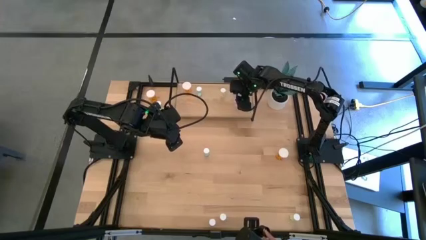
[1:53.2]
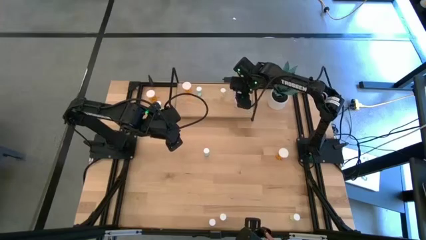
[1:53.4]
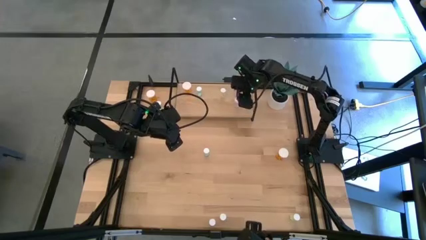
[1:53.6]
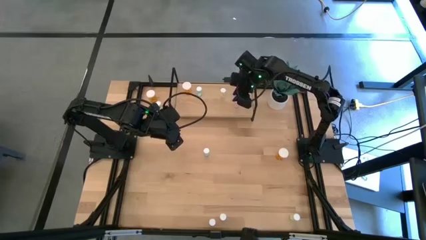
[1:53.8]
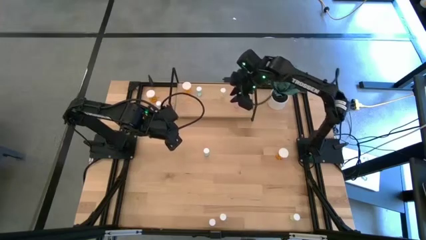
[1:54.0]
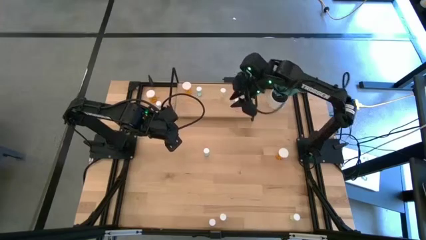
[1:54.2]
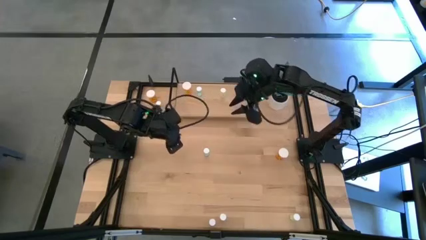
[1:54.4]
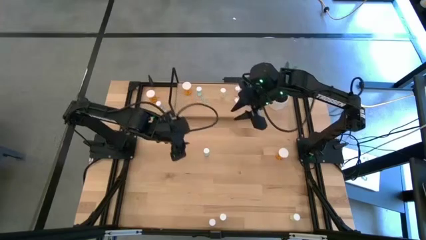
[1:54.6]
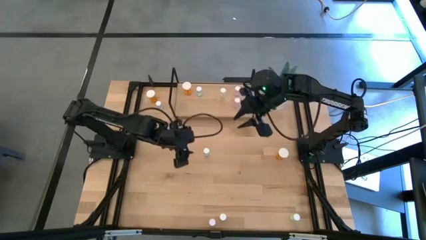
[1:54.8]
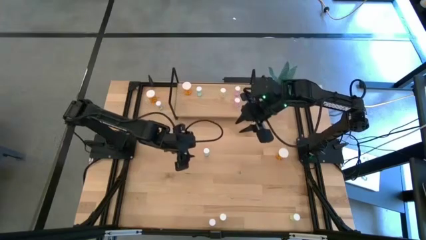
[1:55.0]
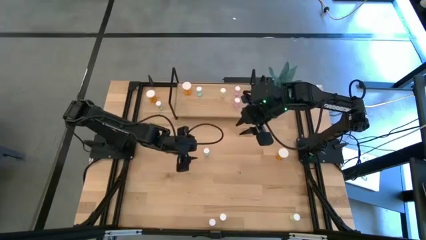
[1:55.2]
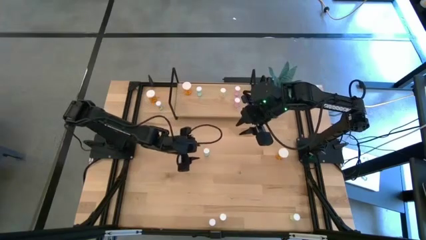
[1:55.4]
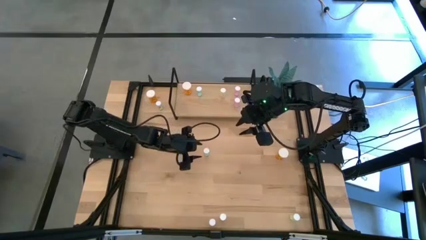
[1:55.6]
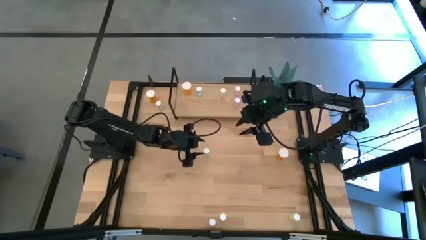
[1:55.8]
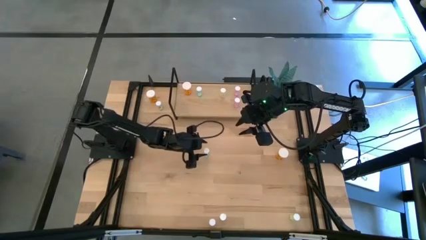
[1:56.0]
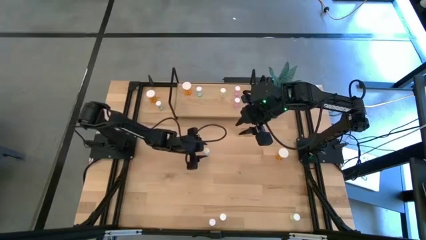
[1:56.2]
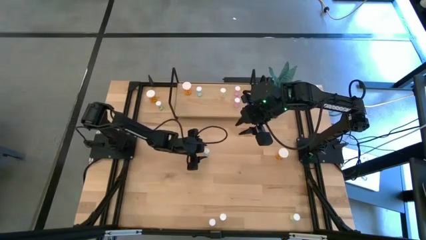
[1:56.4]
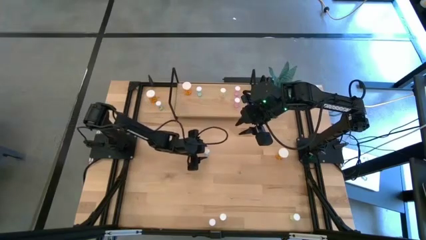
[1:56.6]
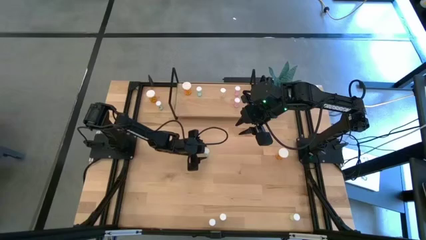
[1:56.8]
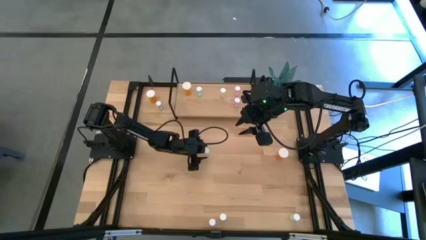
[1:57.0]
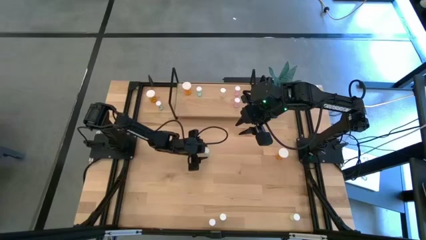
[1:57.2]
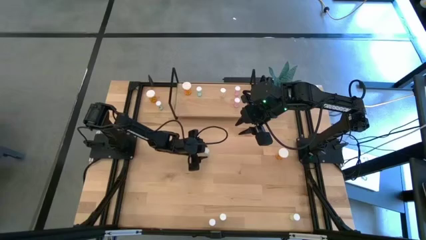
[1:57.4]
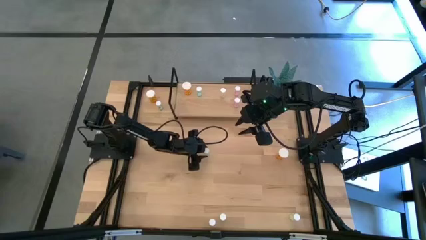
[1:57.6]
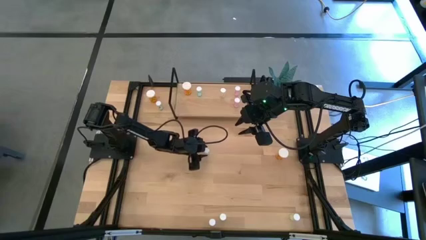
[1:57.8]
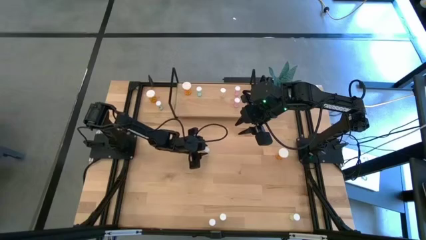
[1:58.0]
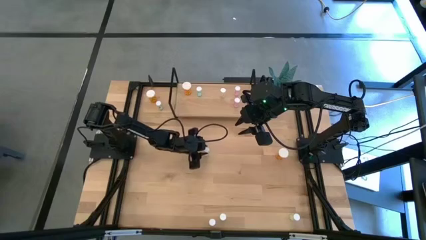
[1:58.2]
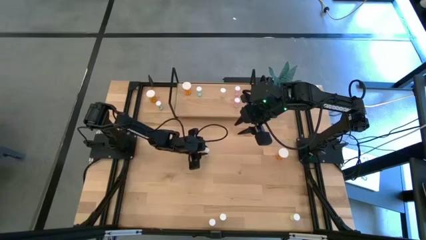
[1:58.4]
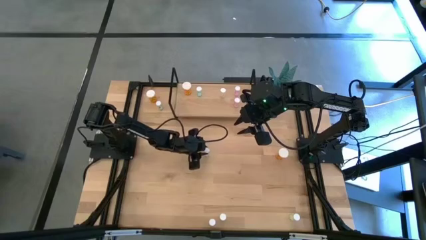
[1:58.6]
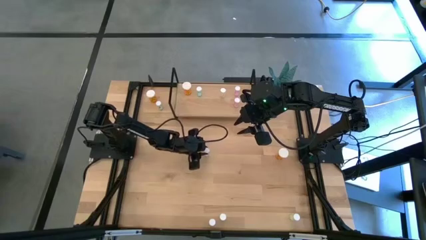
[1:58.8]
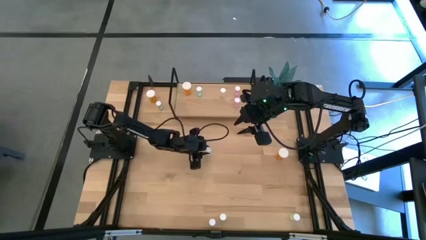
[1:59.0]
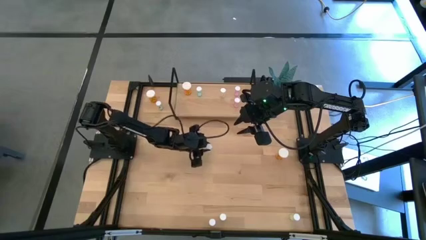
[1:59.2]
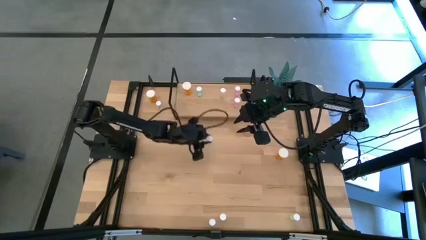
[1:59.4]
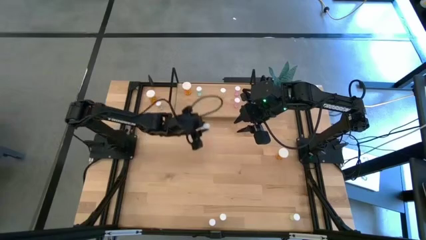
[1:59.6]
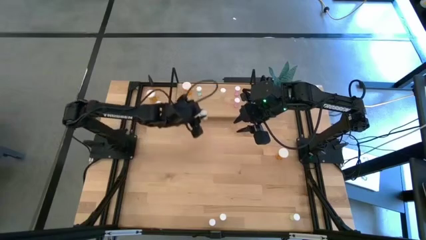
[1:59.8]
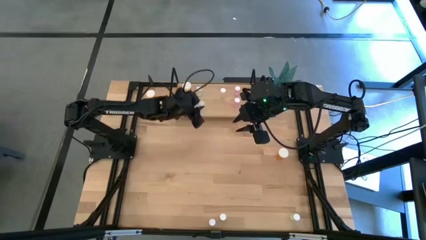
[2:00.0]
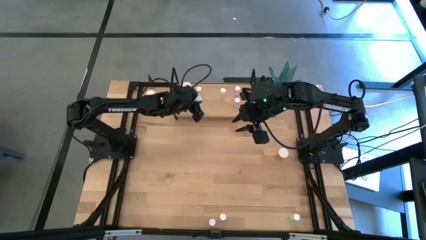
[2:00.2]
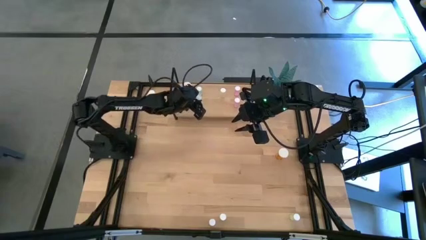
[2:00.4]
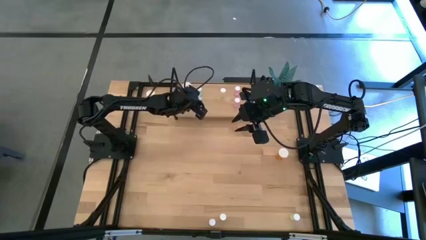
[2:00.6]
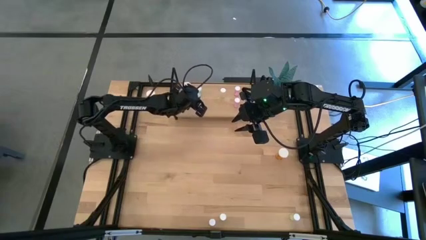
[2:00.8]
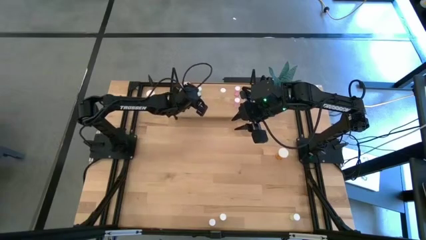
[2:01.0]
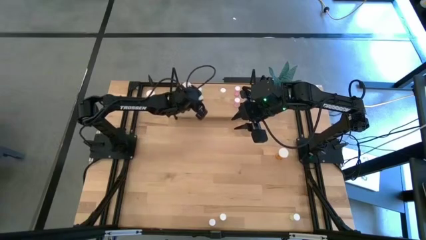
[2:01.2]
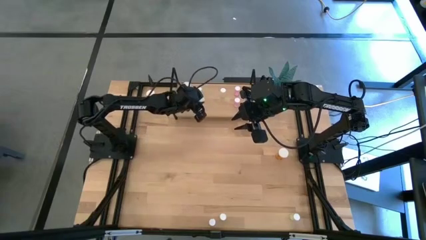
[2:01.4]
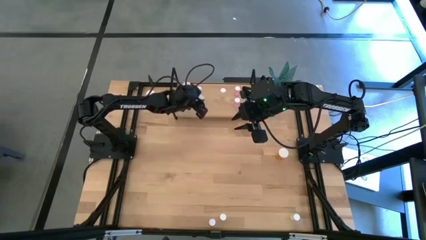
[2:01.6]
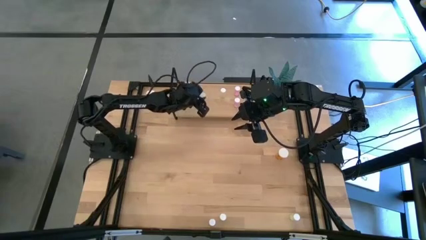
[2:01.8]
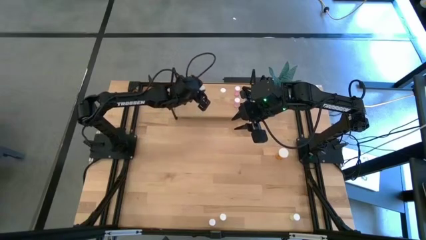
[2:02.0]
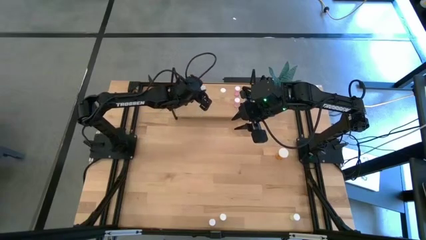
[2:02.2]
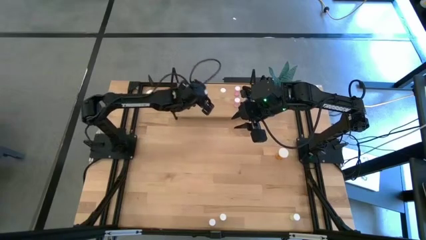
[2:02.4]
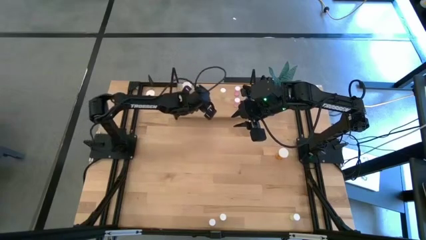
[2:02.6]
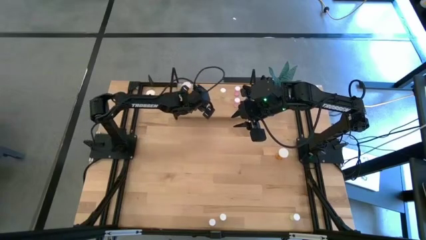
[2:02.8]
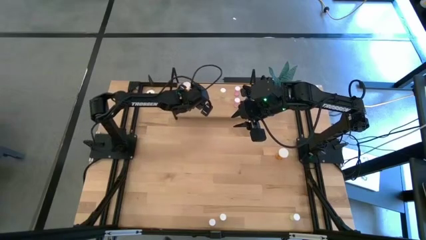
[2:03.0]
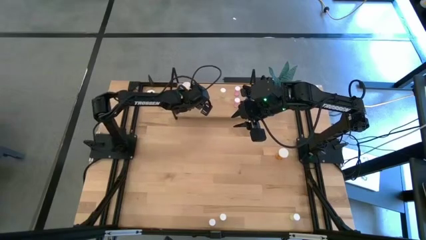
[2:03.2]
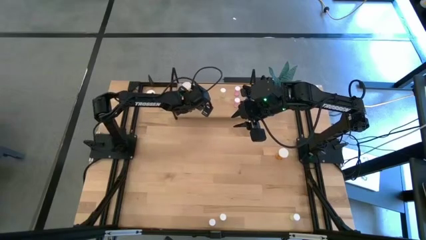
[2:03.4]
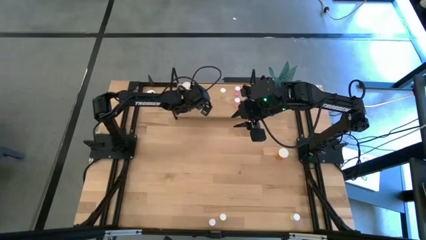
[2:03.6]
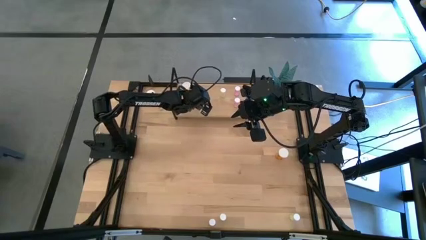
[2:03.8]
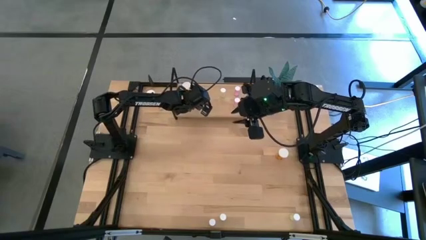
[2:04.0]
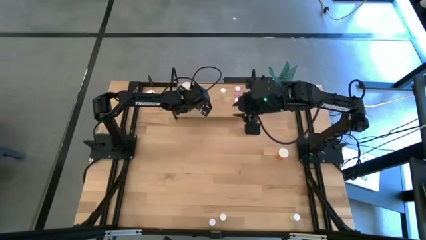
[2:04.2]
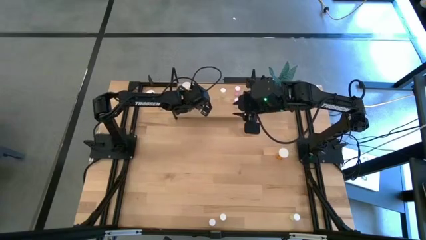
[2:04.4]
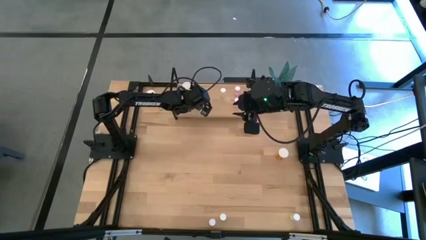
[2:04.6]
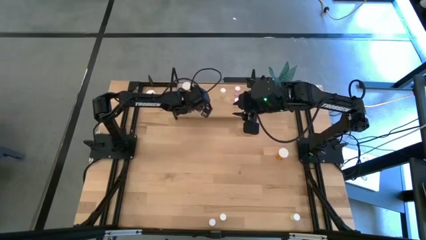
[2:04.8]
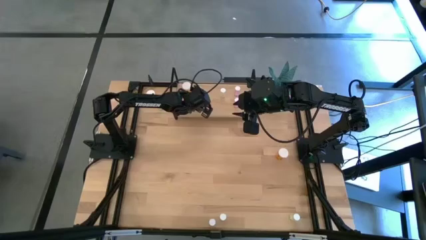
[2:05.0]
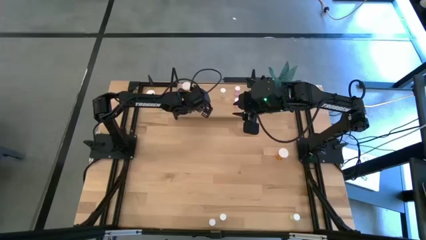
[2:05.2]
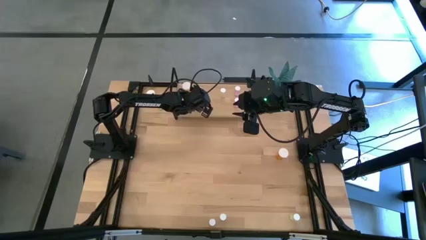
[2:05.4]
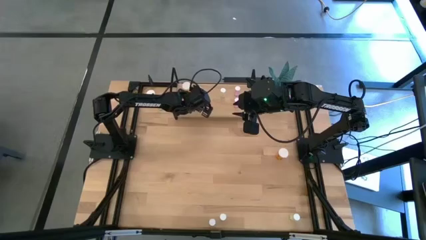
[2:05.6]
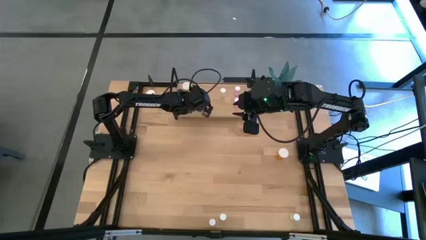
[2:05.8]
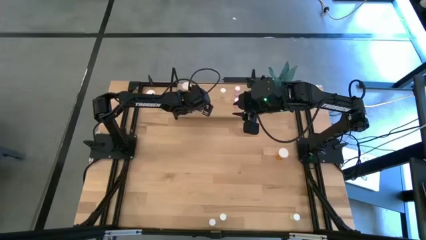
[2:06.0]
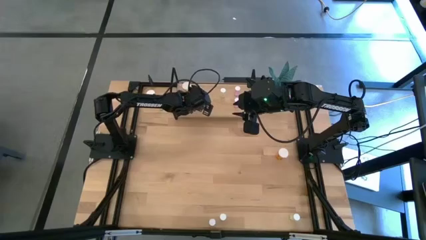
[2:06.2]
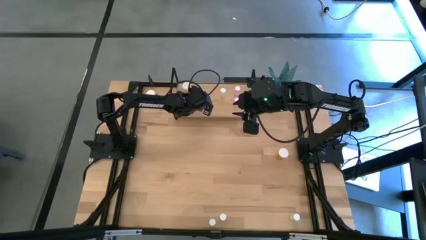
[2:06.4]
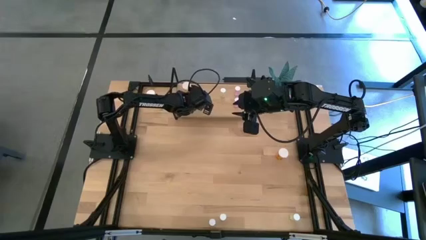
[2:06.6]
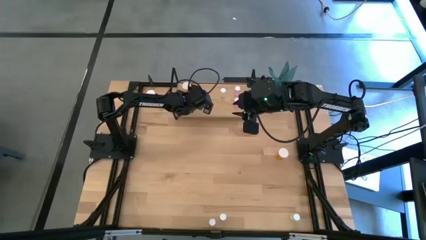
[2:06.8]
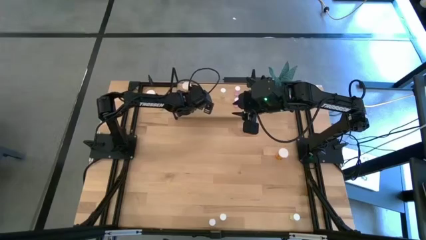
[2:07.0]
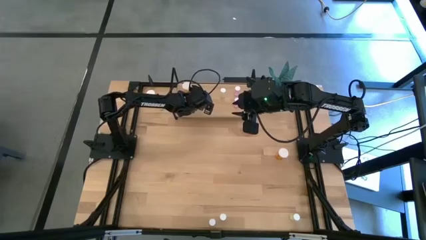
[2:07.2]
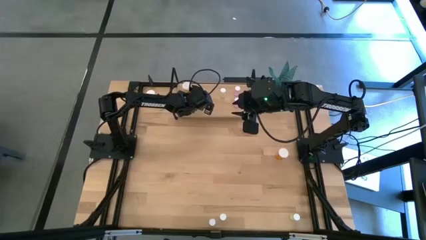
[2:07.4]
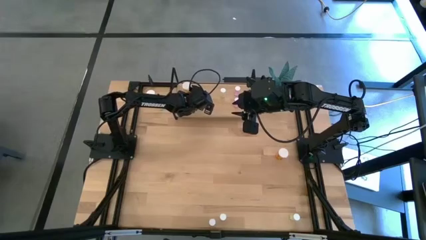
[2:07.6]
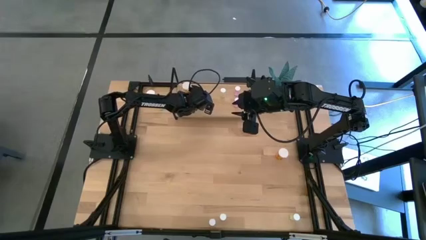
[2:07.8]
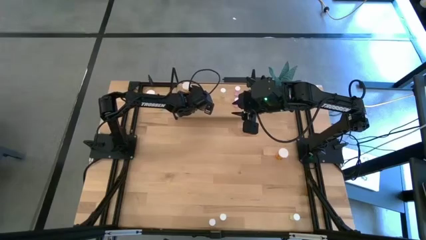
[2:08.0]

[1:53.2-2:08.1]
Task: Pick and place medicine bottles onto shelf by color
Put the right blue pill bottle on the shelf aligned with the other blue pill bottle
